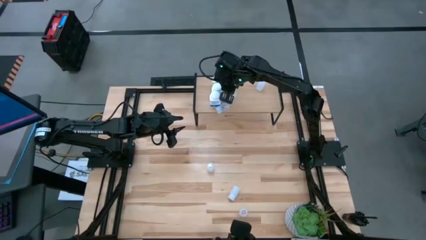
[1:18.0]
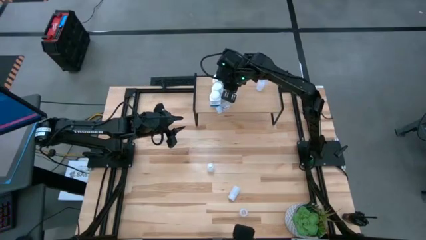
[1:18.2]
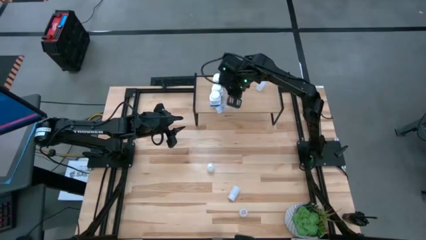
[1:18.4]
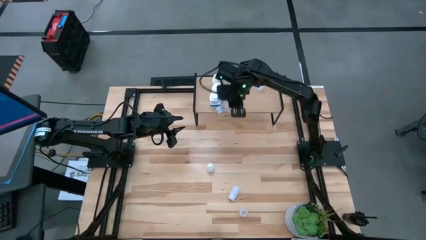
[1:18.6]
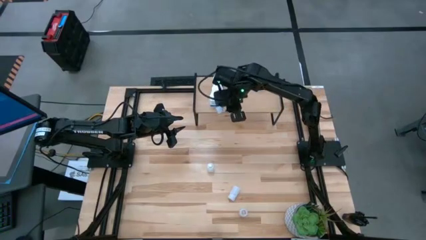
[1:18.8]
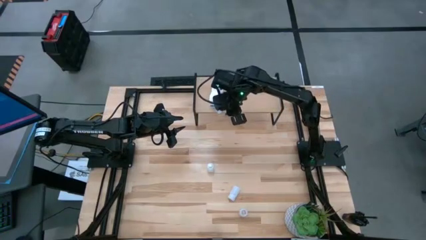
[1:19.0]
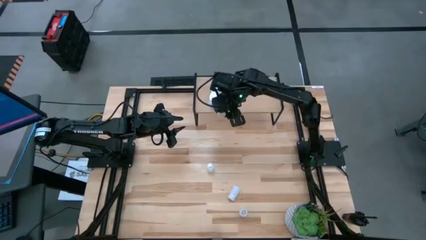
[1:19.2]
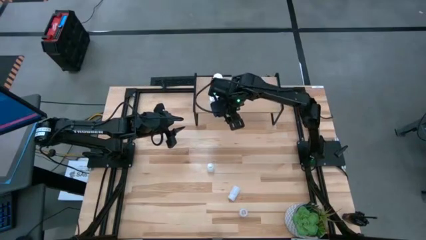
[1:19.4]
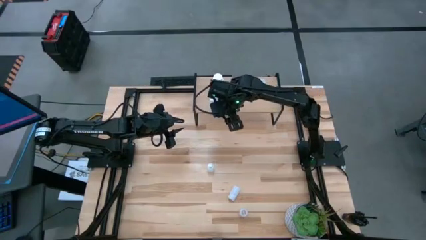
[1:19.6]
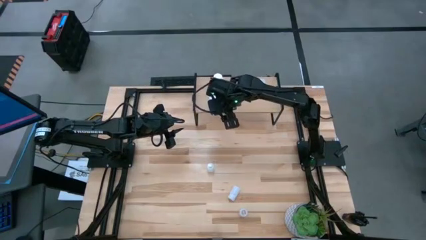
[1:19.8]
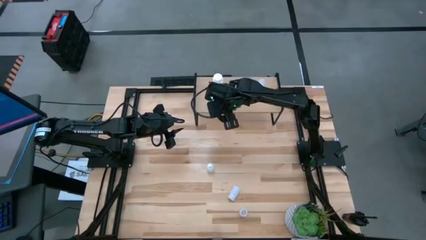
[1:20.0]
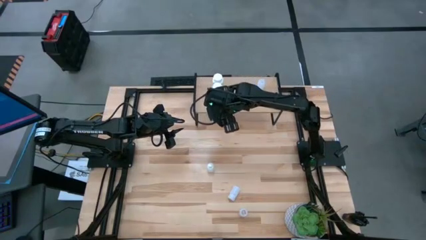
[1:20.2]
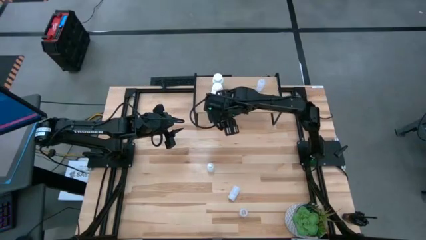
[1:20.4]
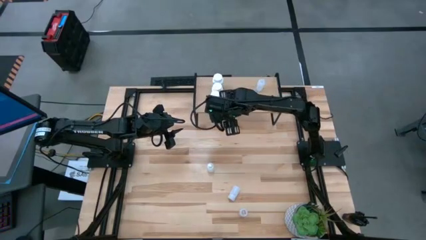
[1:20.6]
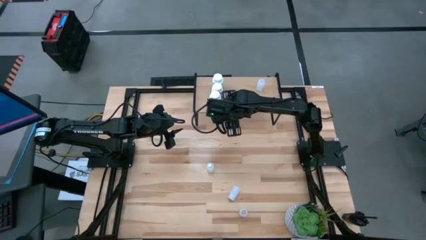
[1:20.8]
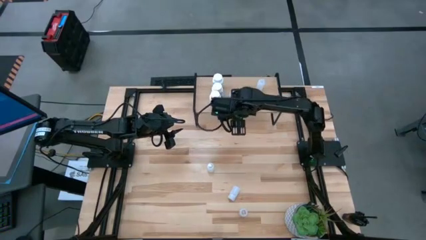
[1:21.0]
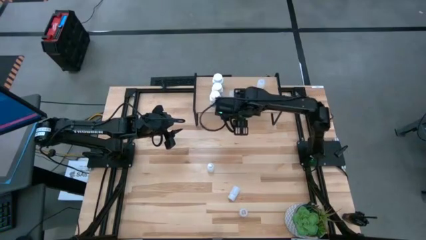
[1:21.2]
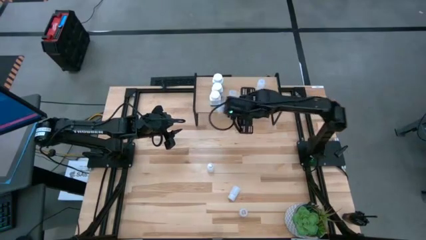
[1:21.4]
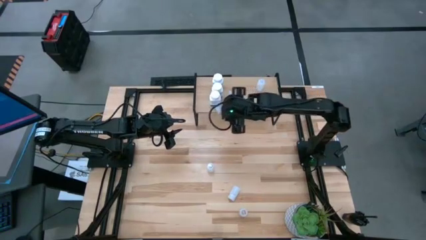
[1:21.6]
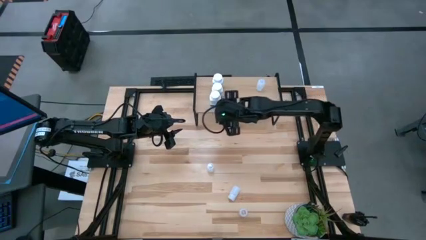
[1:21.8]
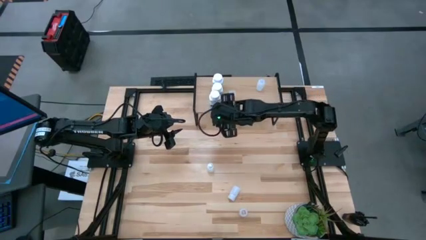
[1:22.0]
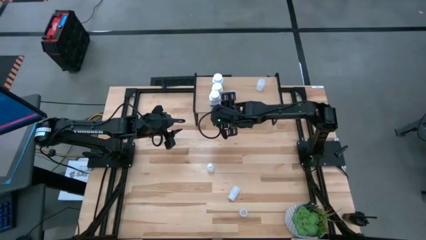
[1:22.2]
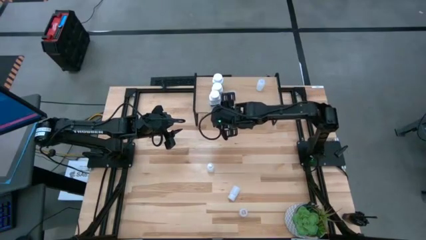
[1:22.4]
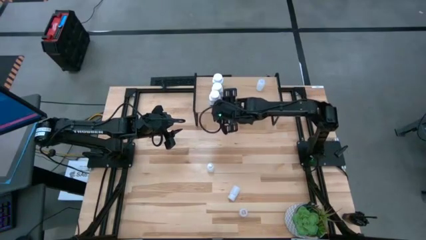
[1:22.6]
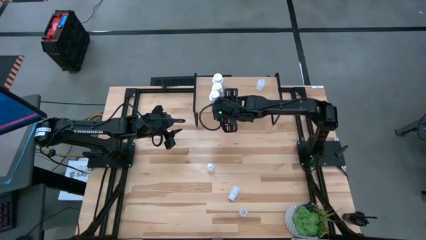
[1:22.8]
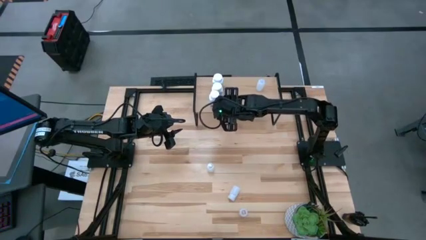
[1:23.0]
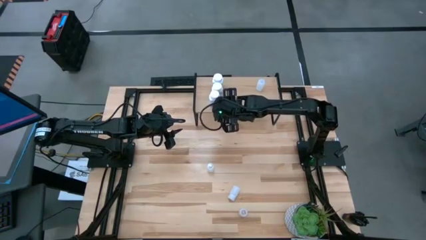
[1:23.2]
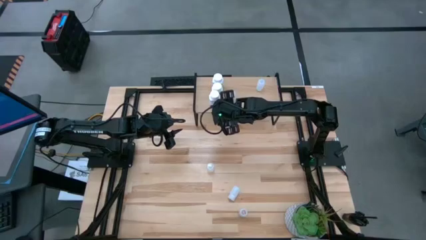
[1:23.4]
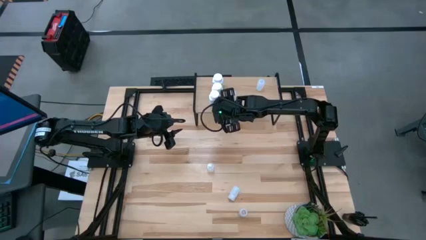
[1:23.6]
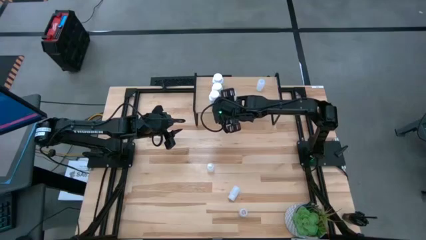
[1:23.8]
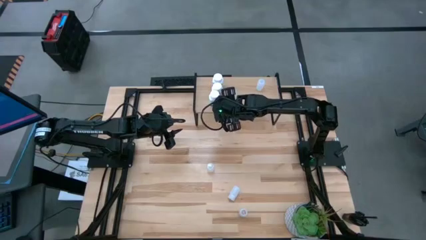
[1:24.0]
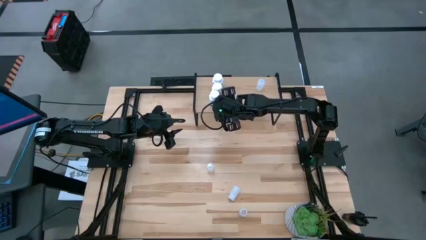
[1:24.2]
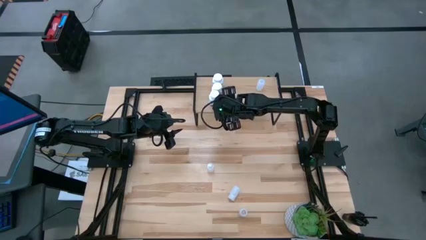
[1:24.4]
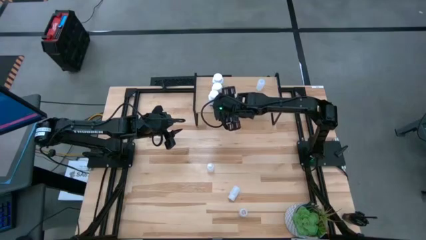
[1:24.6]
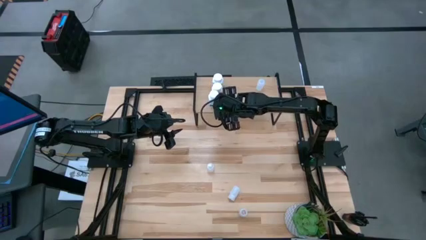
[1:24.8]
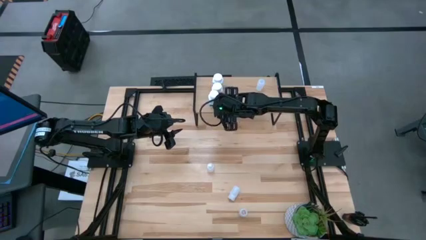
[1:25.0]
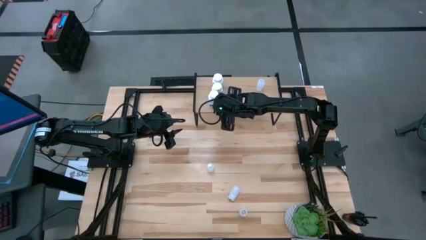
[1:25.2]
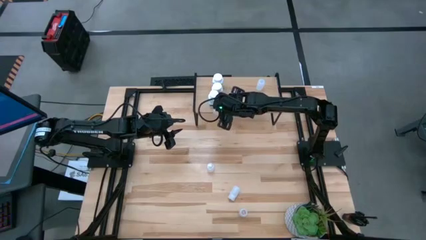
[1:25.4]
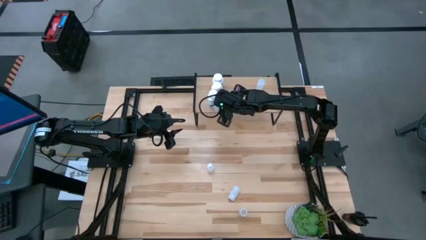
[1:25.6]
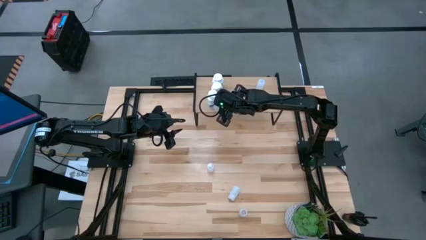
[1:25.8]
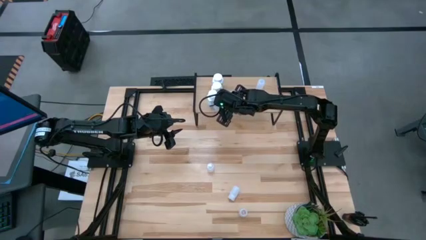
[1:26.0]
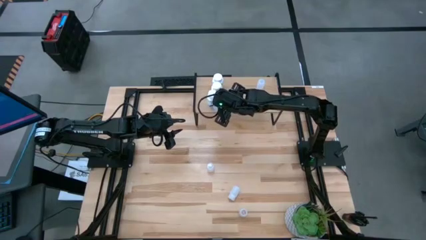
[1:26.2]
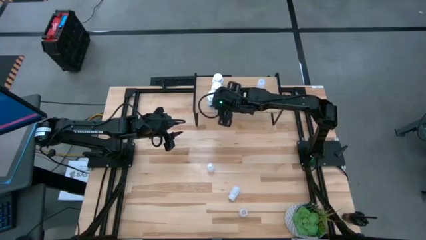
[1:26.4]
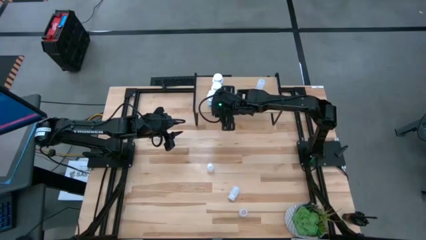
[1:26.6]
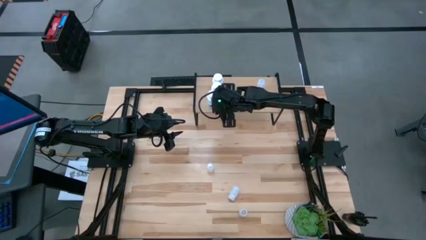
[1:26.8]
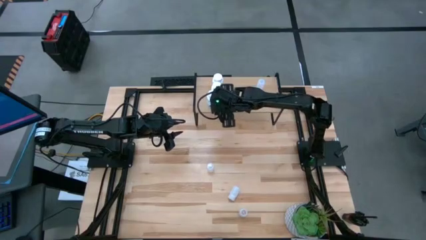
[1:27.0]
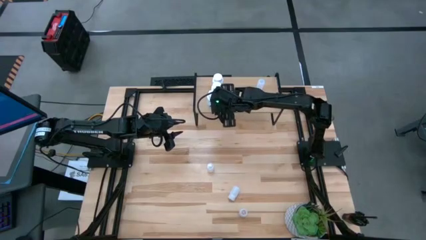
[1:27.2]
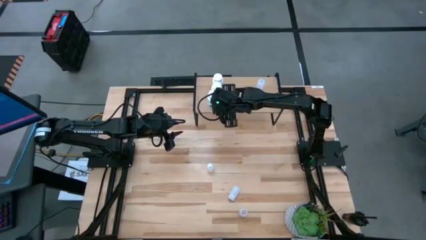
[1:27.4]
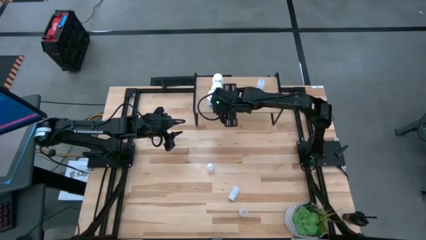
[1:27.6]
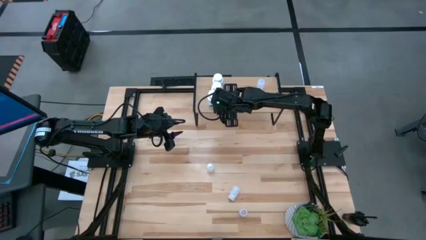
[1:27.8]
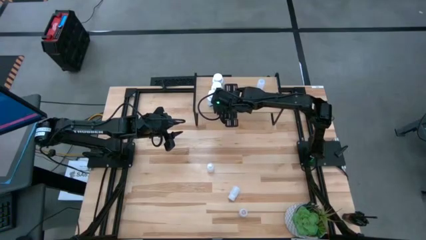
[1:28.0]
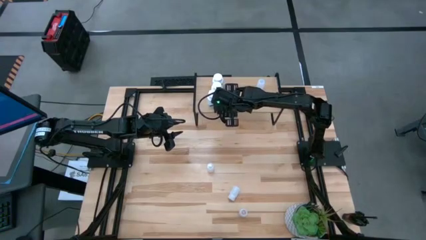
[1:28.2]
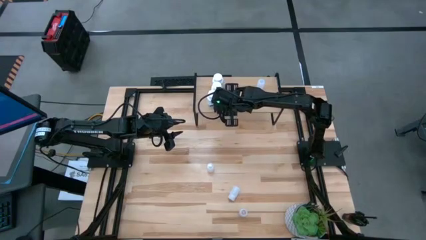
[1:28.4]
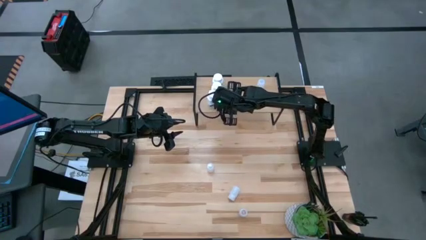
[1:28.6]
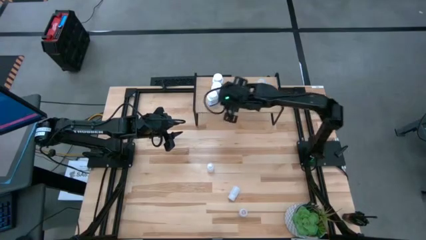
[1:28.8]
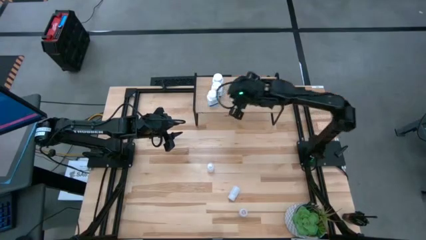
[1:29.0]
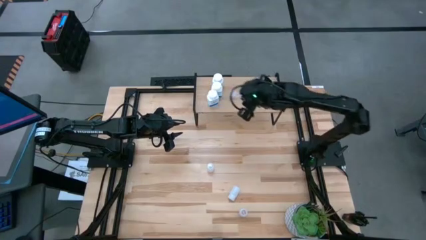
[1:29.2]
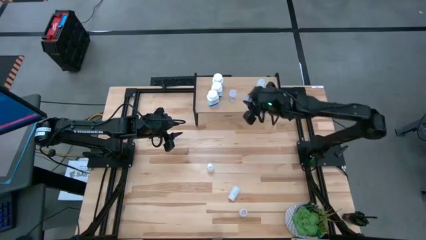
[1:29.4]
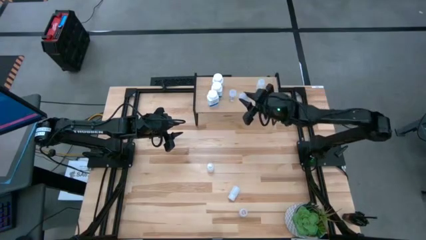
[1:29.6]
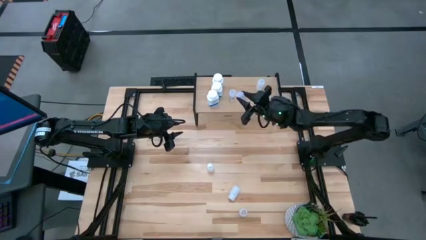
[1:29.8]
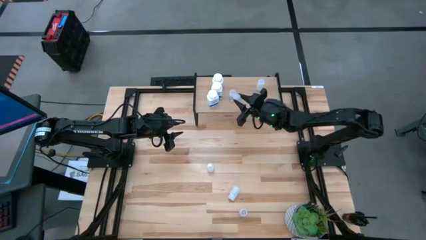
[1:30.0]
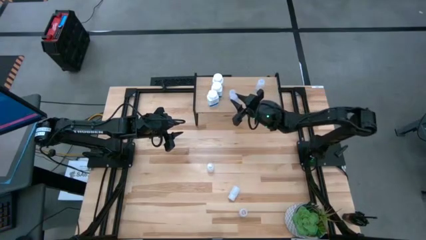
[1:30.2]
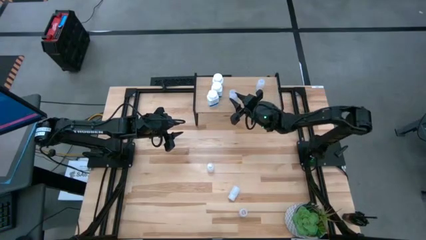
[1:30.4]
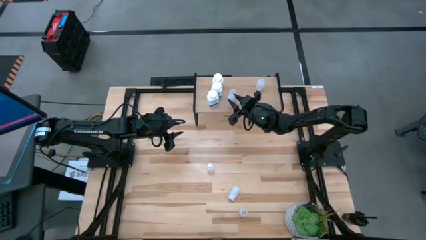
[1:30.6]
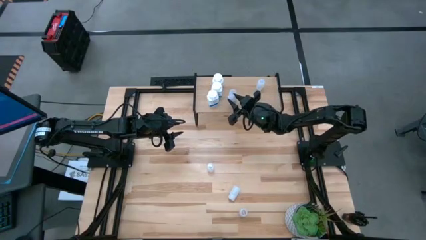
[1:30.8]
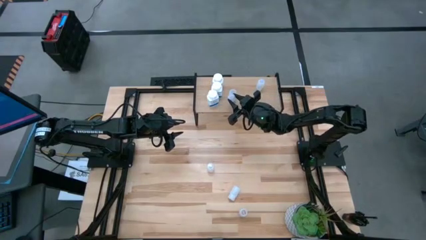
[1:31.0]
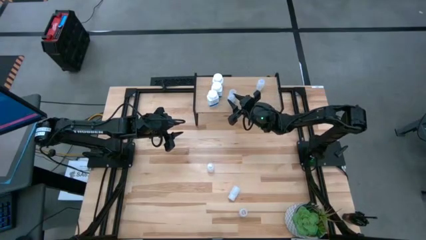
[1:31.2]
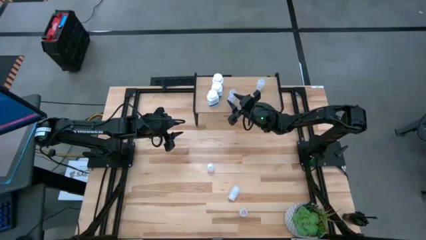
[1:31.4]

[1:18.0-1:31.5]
Task: Pick and place medicine bottles onto shelf by color
Put the left transparent pill bottle on the shelf aligned with the other transparent bottle

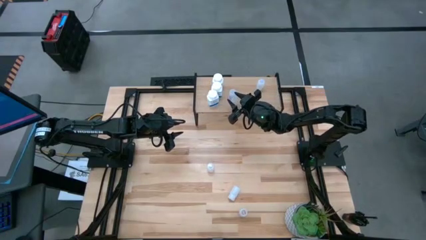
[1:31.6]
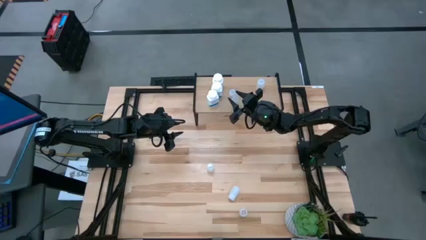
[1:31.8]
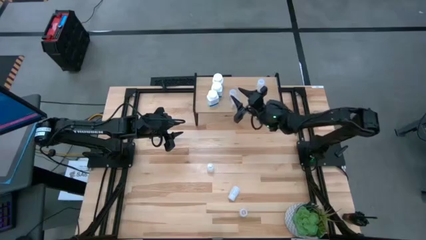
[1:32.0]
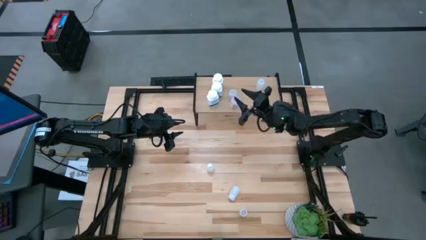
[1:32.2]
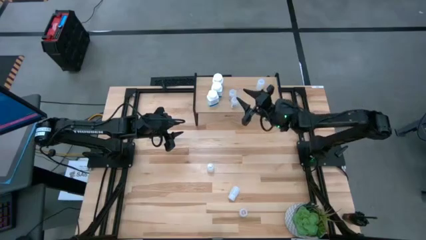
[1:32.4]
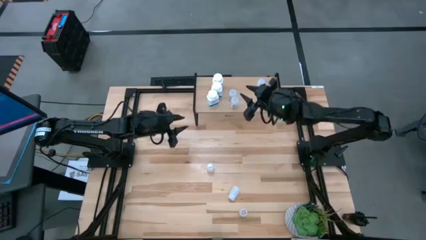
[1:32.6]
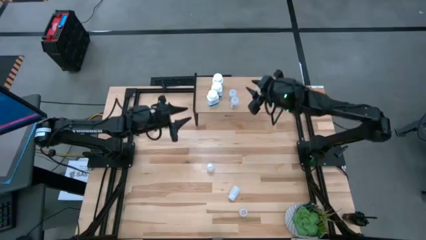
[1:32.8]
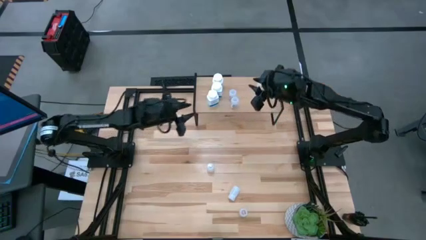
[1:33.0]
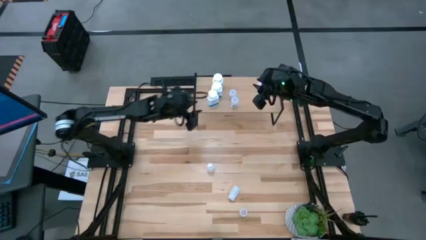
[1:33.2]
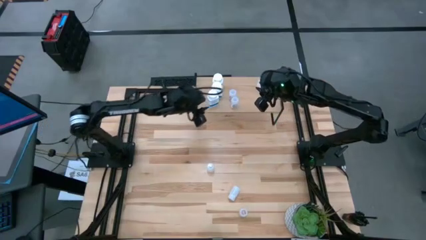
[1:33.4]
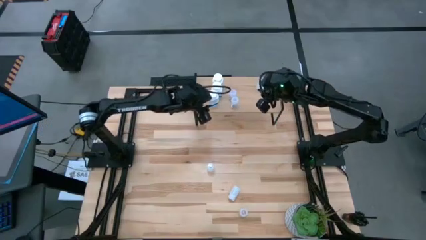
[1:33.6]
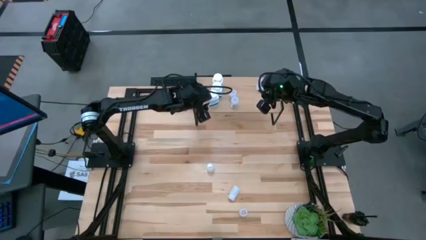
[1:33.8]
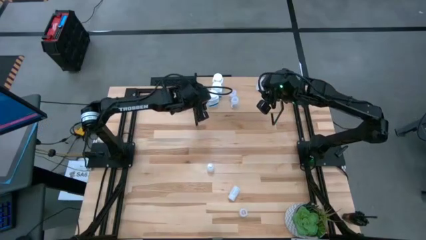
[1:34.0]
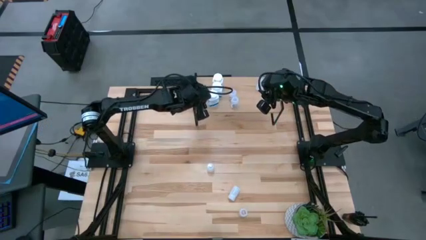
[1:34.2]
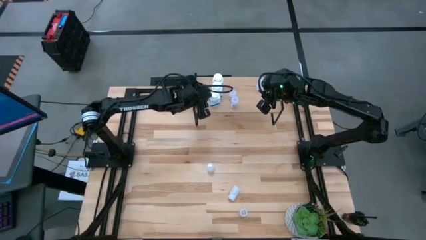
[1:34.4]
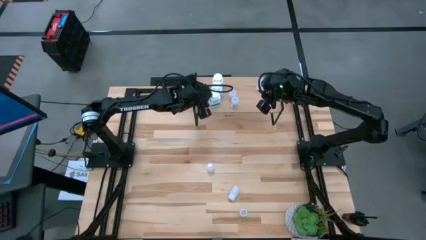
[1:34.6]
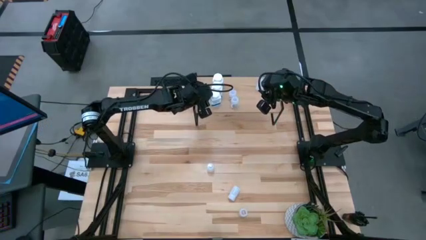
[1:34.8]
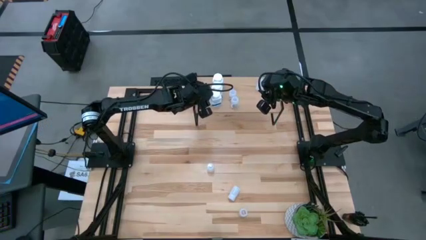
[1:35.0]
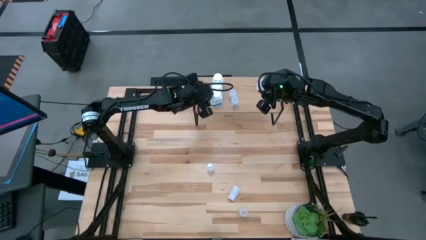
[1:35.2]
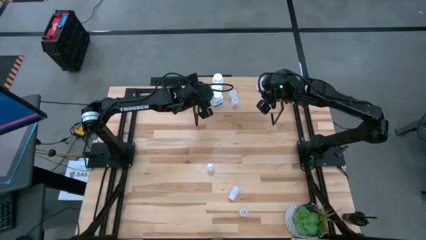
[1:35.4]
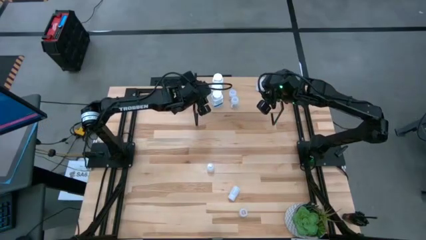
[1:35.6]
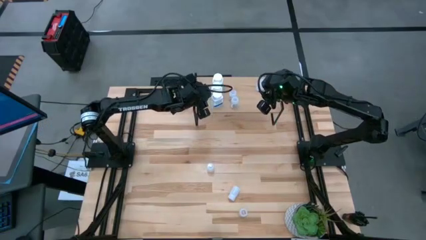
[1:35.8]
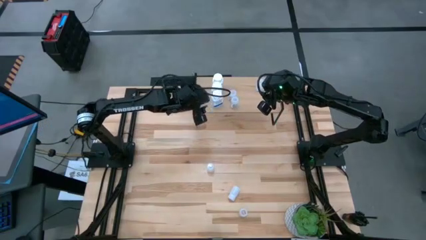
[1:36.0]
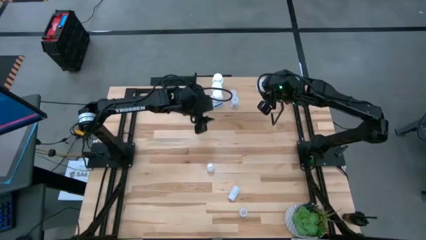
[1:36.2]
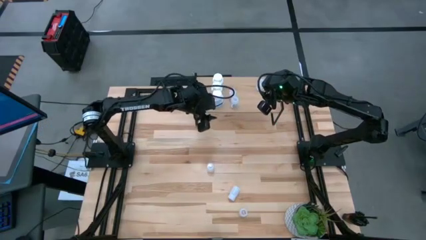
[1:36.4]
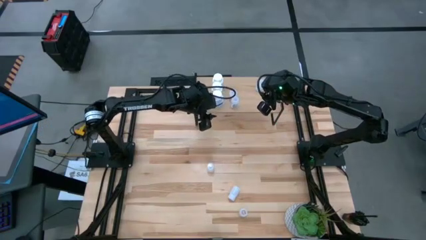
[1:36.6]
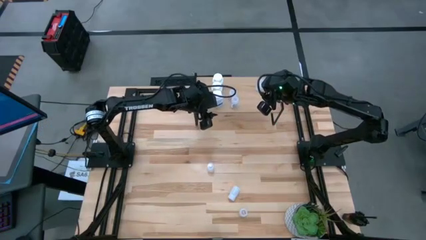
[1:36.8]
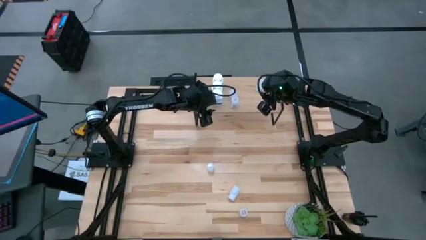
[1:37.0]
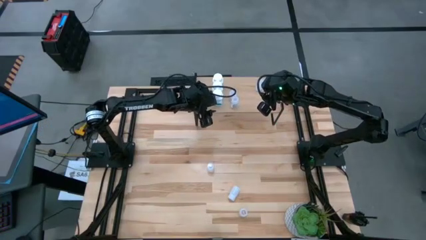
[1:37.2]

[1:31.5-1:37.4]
Adjust the white medicine bottle on the shelf
